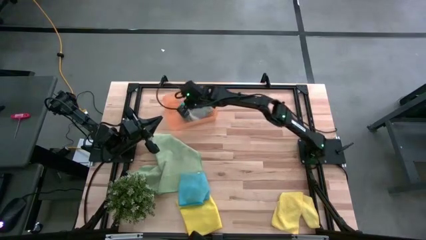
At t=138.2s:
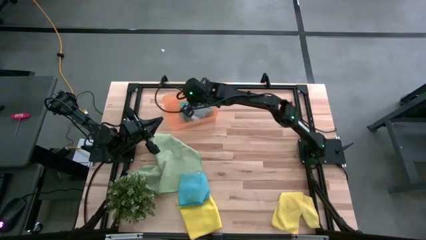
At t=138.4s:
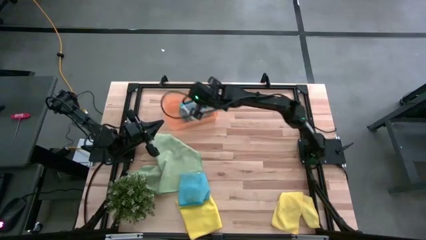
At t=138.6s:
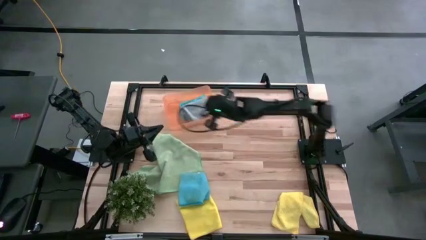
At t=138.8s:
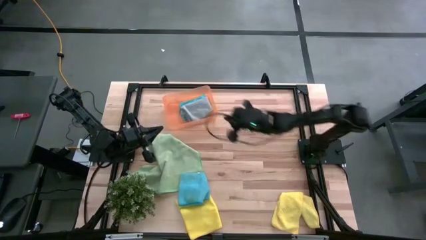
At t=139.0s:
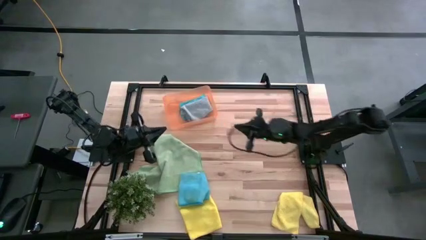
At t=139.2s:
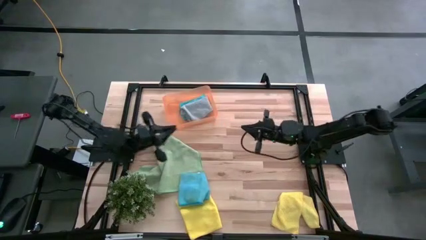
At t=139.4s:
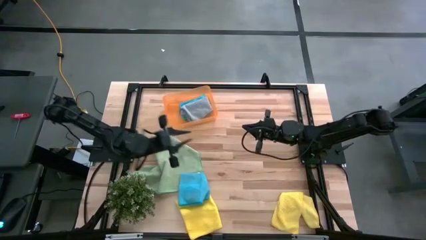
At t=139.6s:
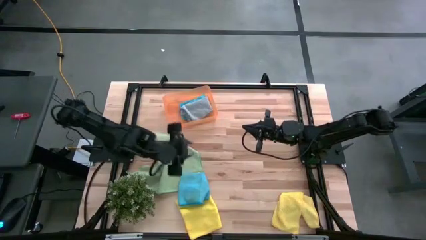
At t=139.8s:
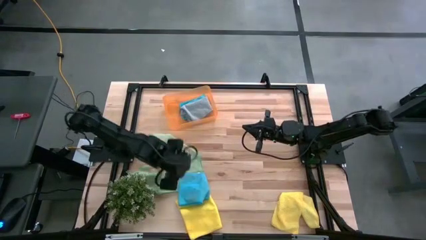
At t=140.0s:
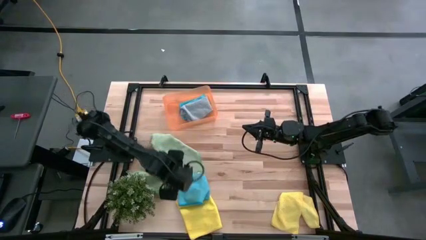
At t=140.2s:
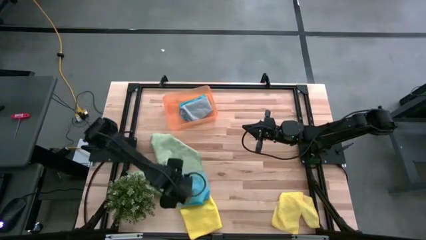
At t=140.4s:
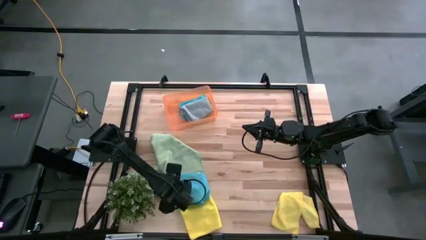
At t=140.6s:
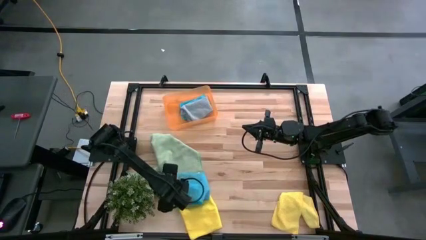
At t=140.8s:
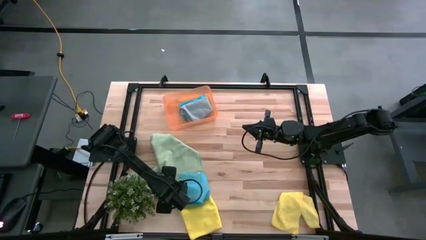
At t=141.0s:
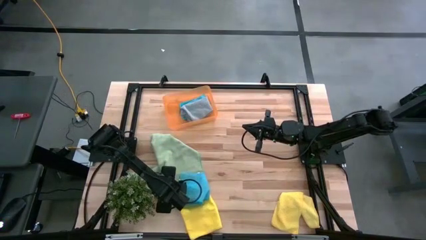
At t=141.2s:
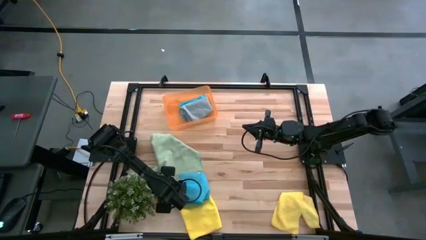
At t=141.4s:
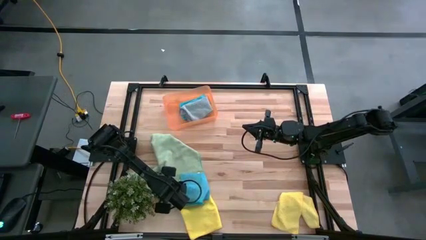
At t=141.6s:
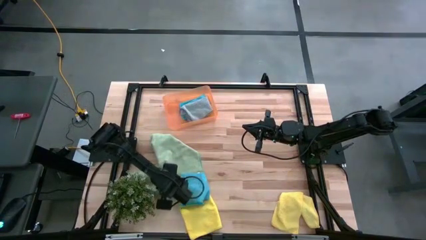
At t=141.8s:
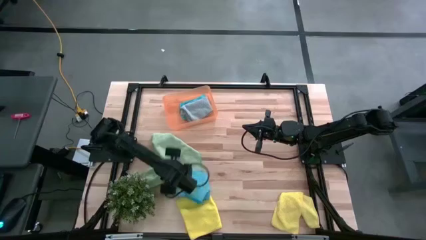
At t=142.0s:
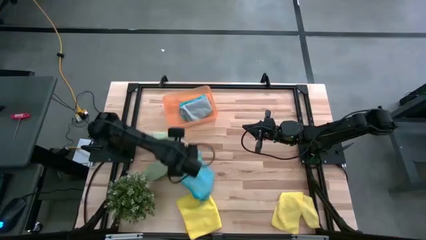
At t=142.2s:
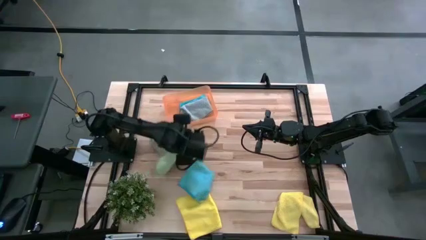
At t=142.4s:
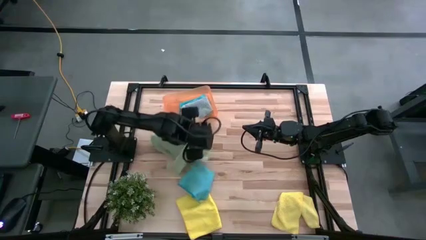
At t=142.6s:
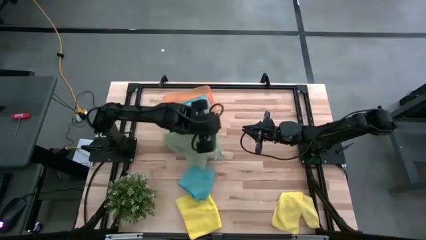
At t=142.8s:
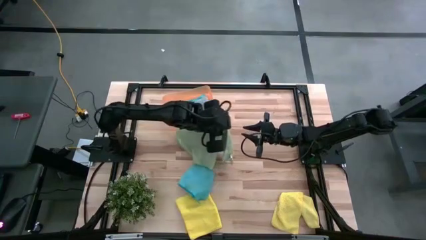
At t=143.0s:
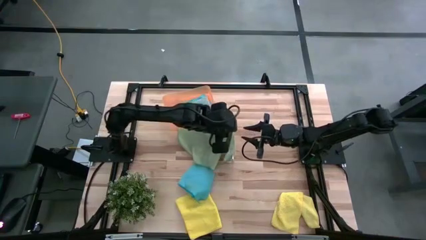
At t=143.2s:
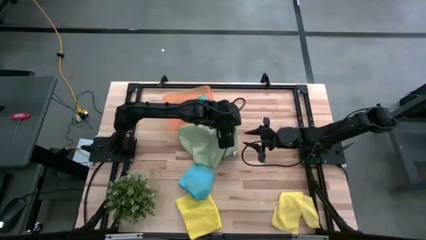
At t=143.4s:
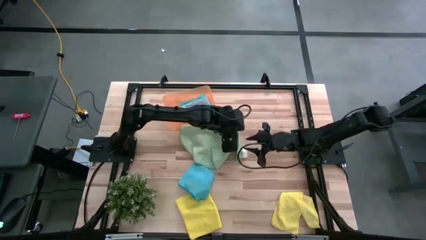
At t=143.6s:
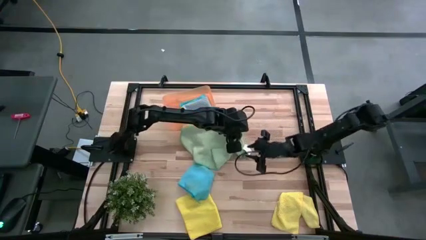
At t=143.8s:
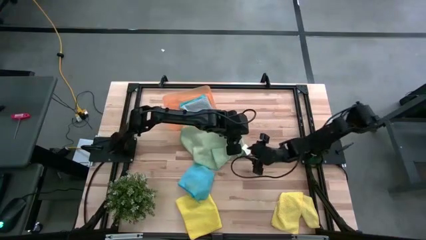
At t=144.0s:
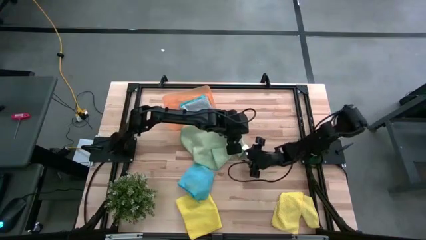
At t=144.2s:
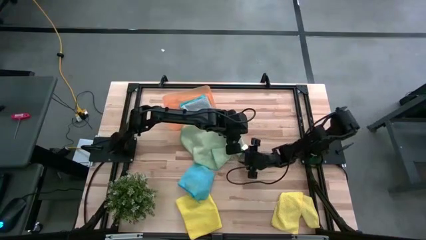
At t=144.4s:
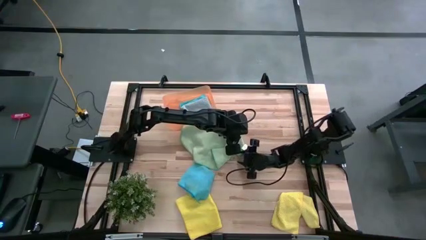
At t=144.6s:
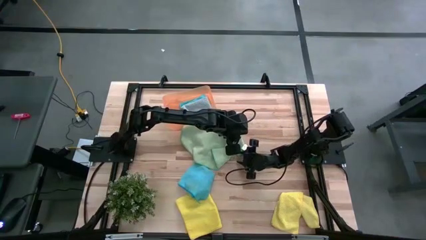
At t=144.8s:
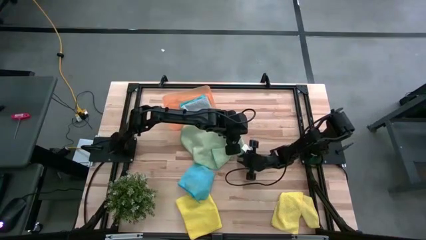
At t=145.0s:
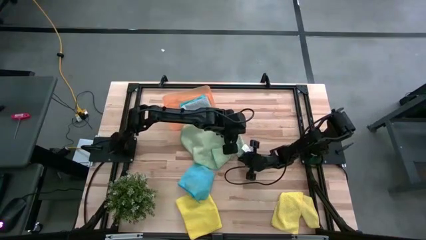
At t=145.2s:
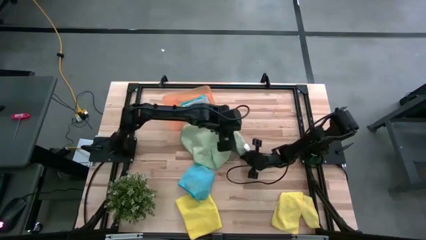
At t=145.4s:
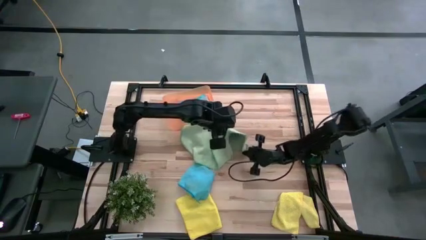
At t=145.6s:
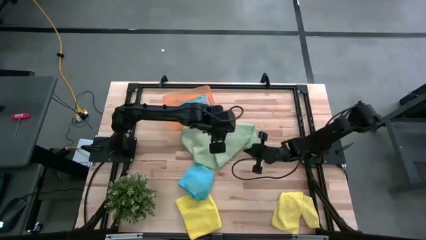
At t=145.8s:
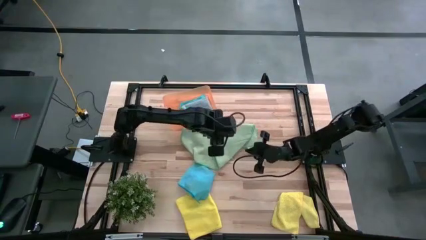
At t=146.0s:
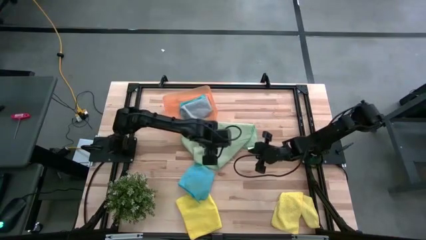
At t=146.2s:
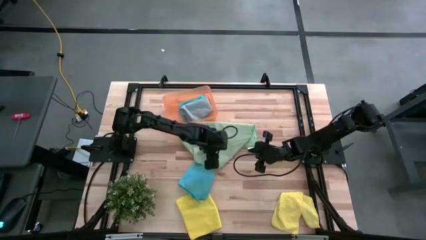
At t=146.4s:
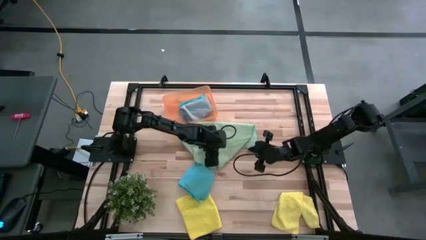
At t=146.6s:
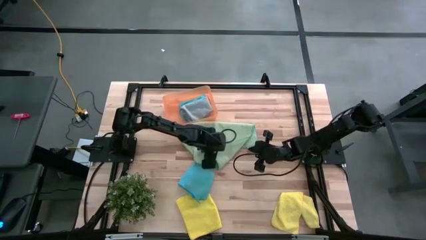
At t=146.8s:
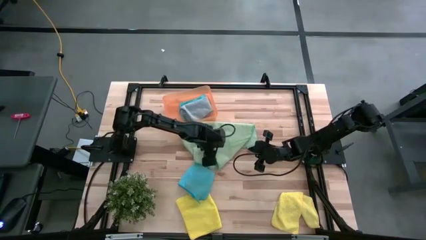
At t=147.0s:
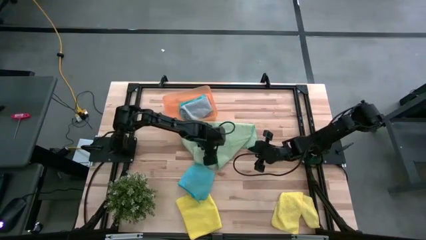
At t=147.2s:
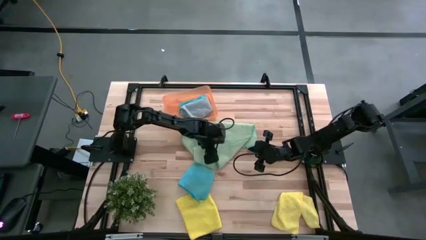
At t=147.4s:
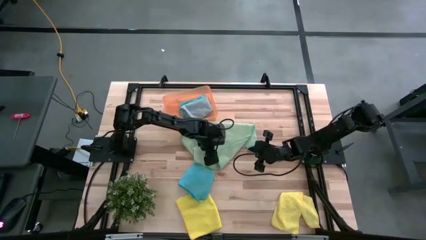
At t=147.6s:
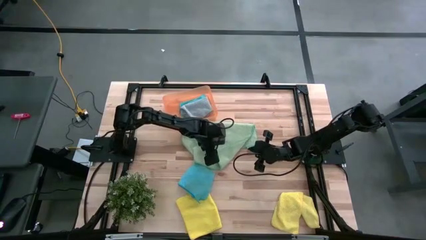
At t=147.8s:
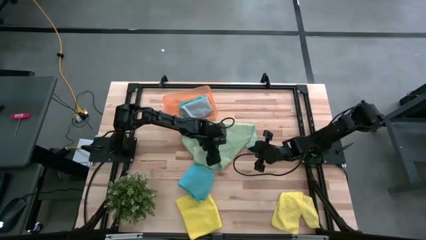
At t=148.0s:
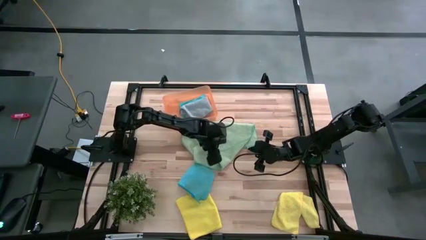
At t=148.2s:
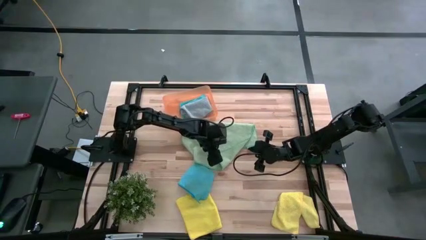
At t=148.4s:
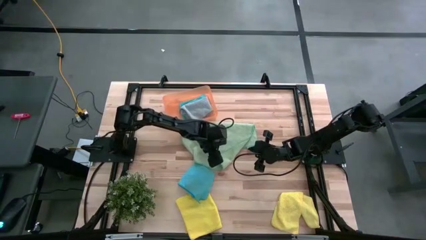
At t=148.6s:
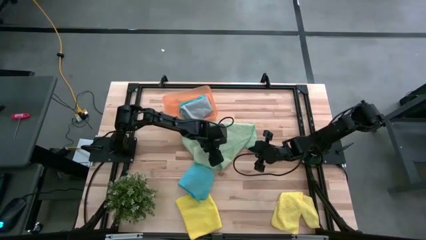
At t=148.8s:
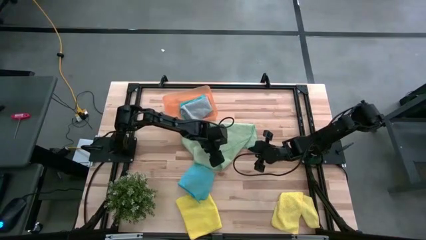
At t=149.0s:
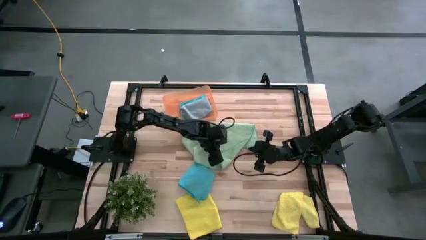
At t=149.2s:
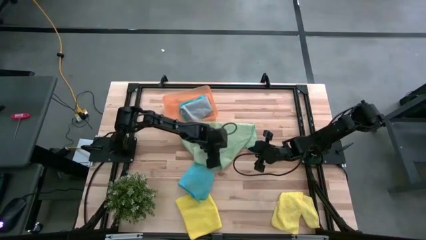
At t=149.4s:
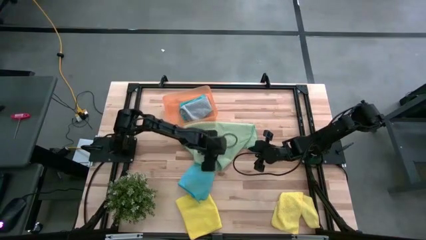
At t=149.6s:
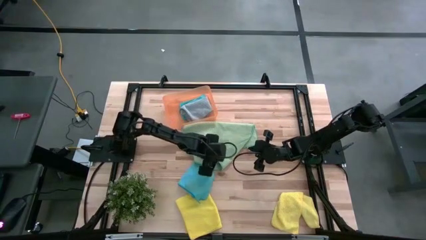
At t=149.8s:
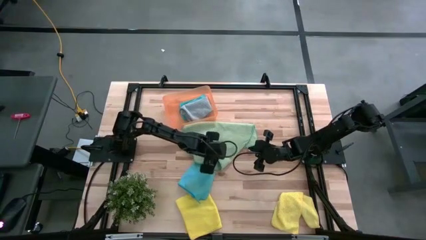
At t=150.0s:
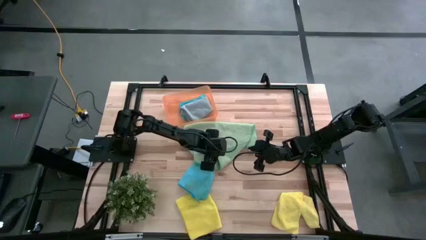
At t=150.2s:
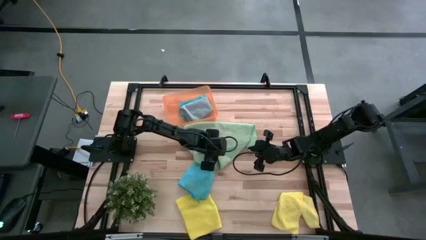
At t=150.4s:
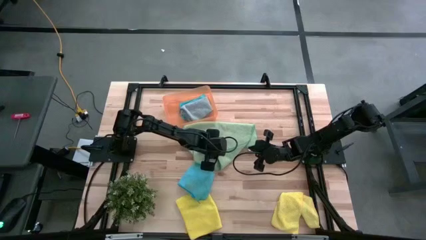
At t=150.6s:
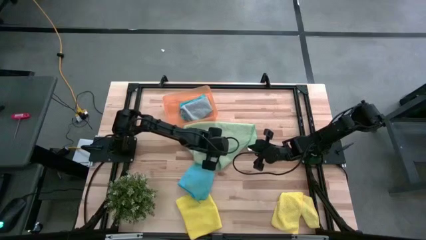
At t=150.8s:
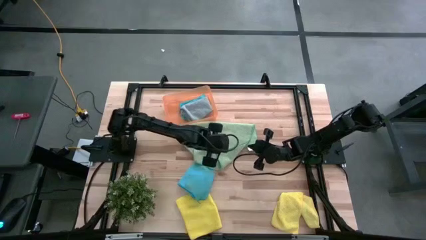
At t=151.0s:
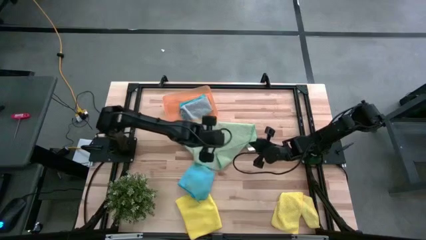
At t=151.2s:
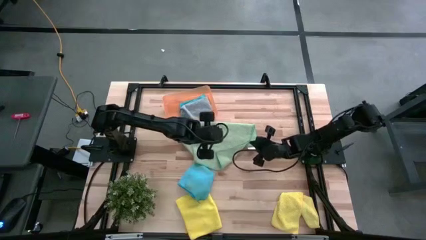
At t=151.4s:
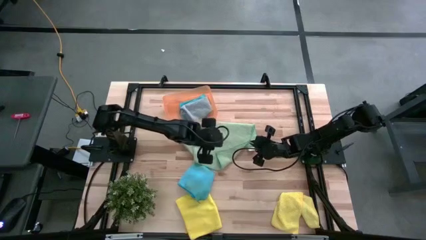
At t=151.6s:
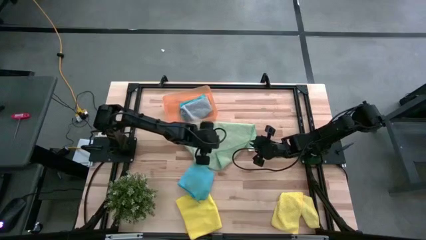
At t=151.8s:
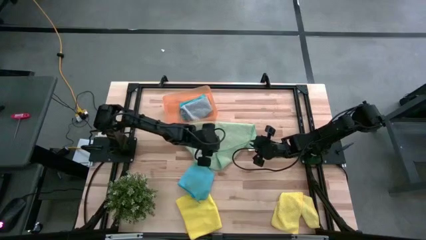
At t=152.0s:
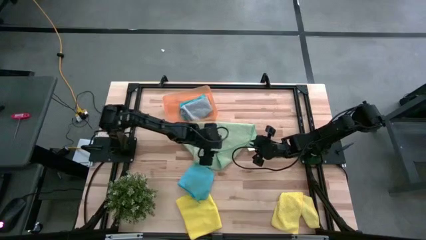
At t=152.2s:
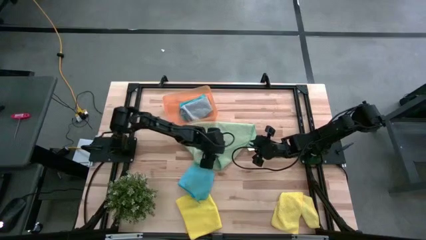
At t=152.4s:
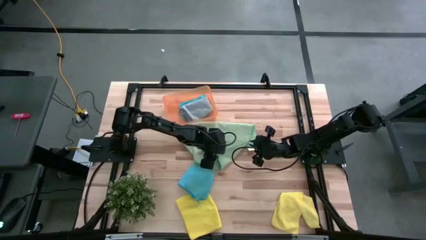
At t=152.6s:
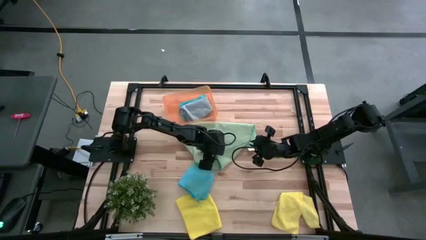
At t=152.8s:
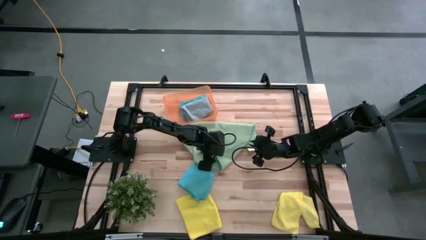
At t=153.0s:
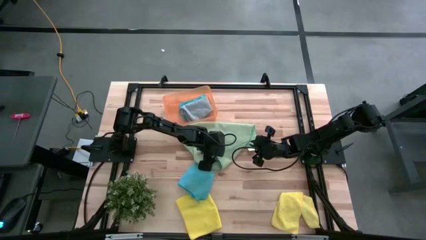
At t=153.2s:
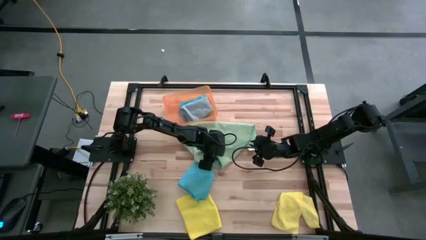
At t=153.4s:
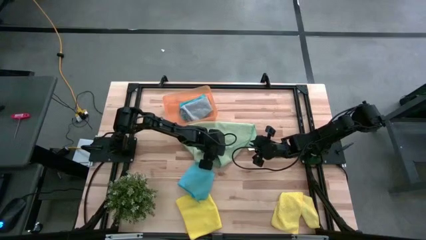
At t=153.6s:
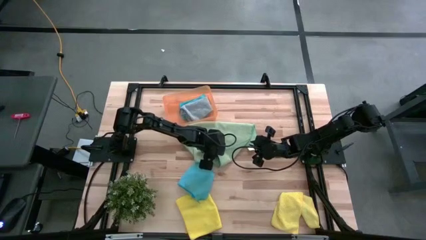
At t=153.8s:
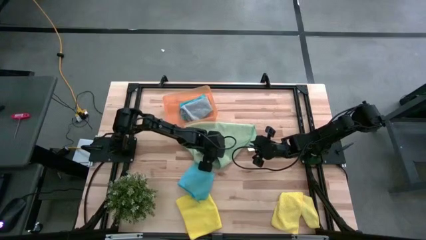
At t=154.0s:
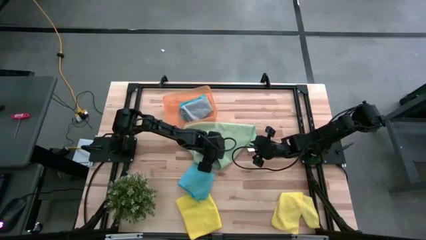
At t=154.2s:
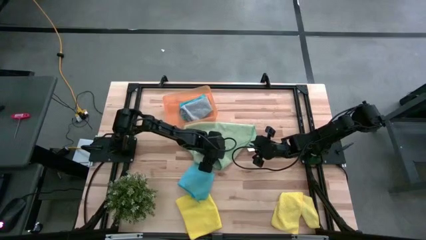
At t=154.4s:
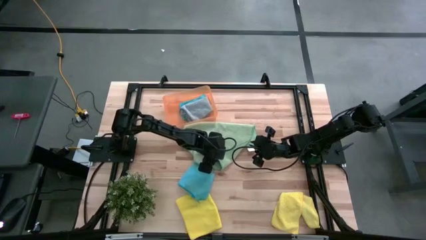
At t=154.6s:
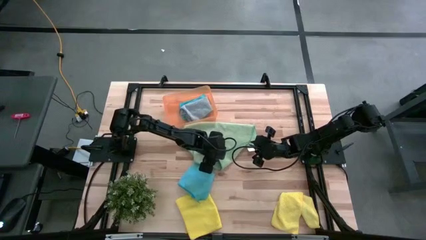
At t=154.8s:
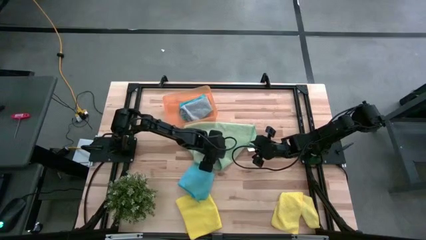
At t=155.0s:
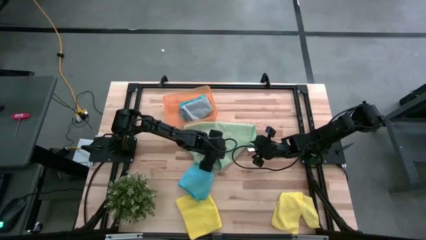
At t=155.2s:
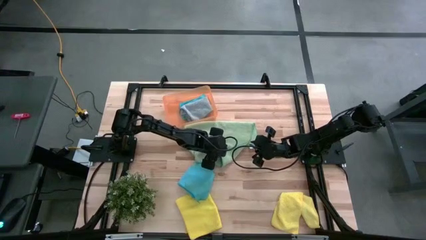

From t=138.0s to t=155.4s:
Task: Fold microfiber towels
Fold the green microfiber cloth
